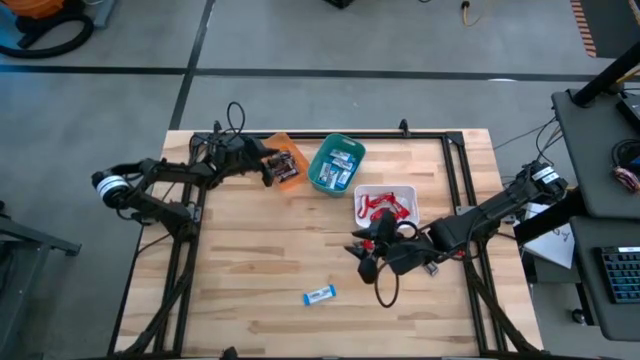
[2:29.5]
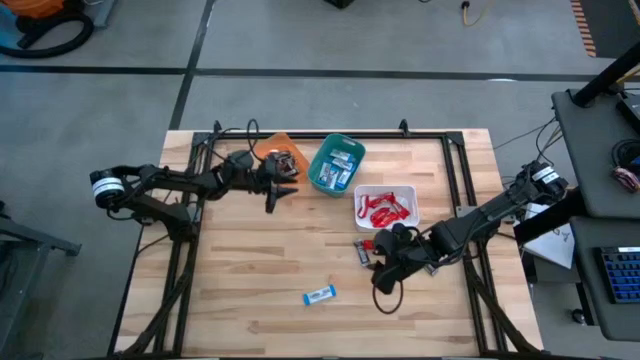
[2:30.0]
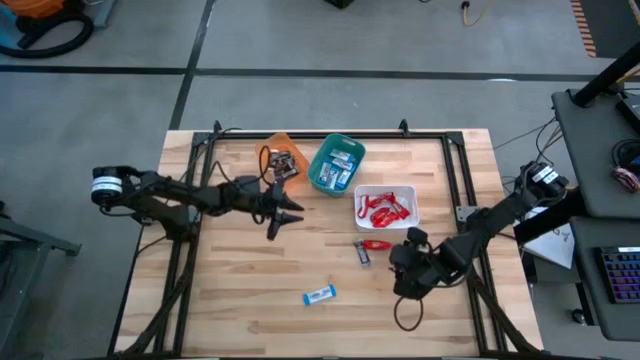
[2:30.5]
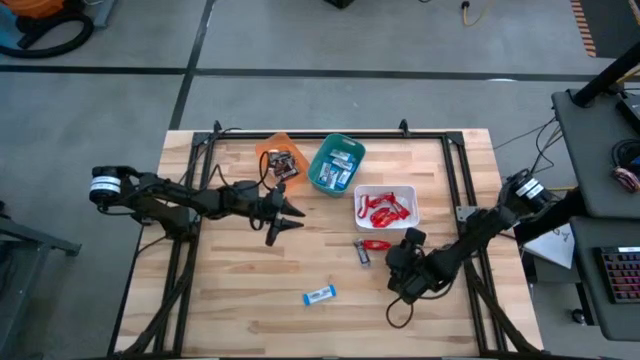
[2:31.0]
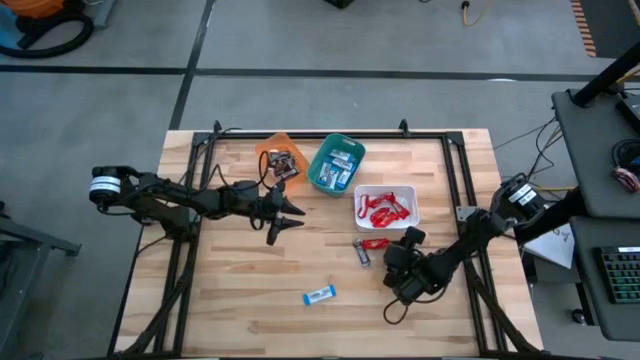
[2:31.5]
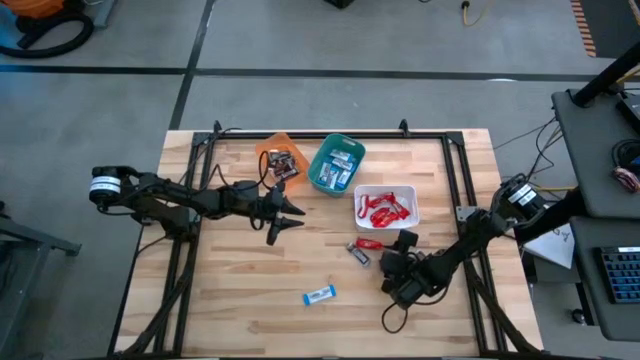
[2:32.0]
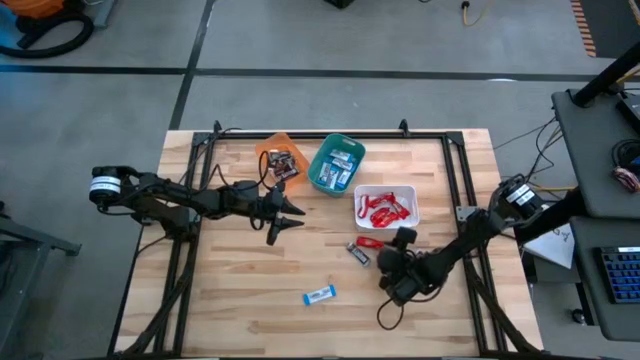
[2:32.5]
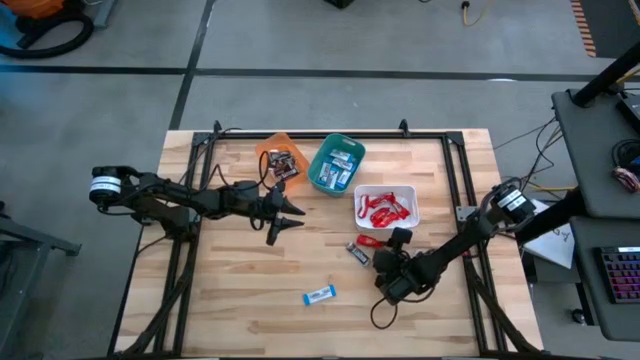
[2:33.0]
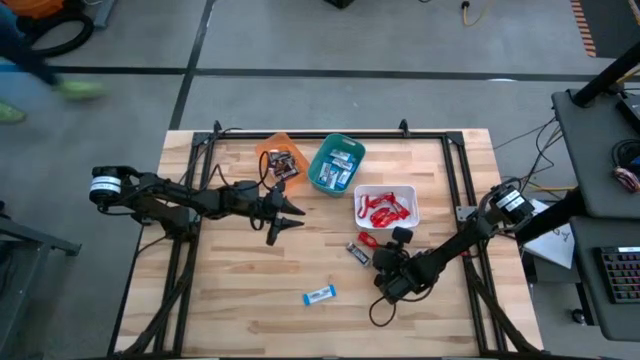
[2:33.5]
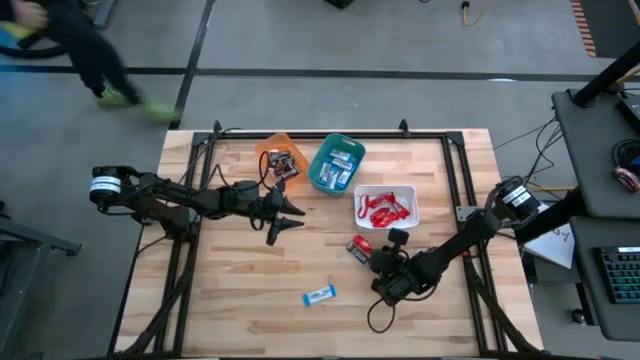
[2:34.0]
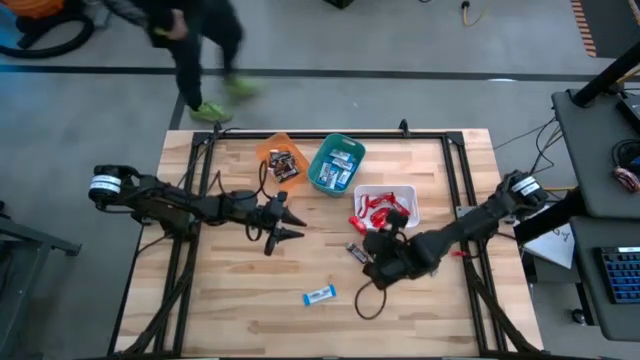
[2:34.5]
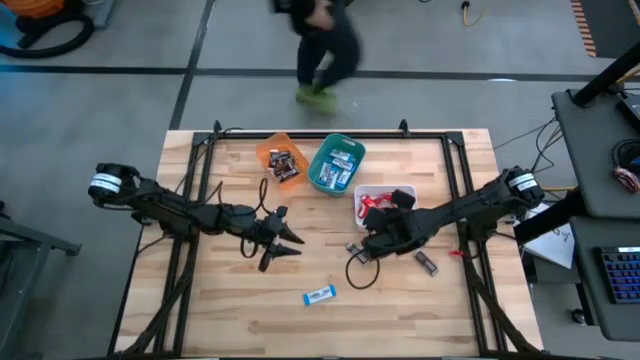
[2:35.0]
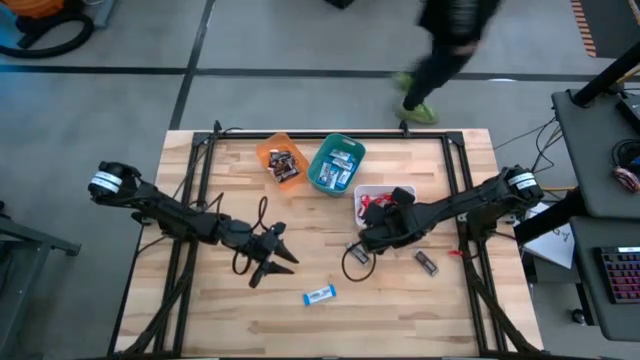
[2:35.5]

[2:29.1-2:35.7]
Task: Sort candy
Put the red chocolate bar into the white bin

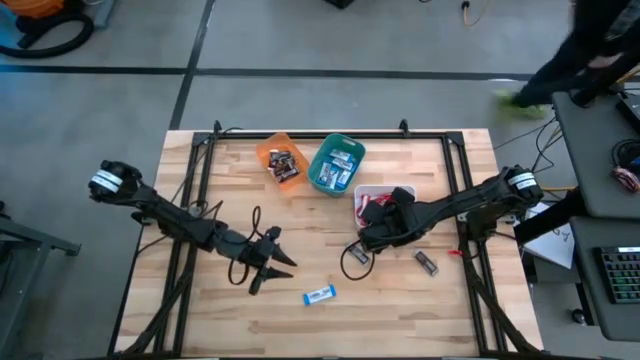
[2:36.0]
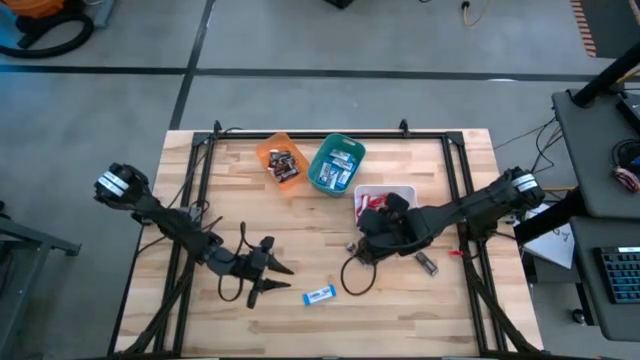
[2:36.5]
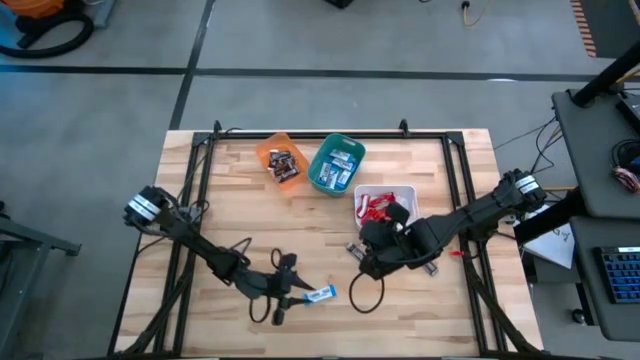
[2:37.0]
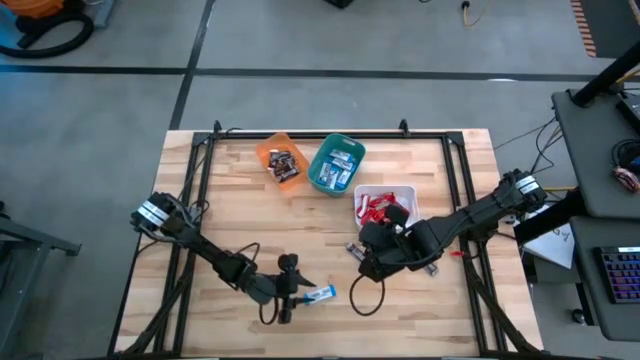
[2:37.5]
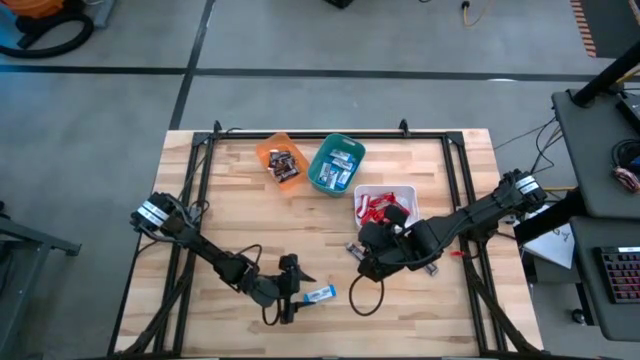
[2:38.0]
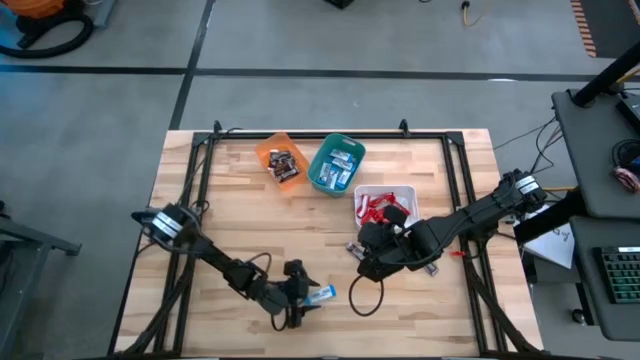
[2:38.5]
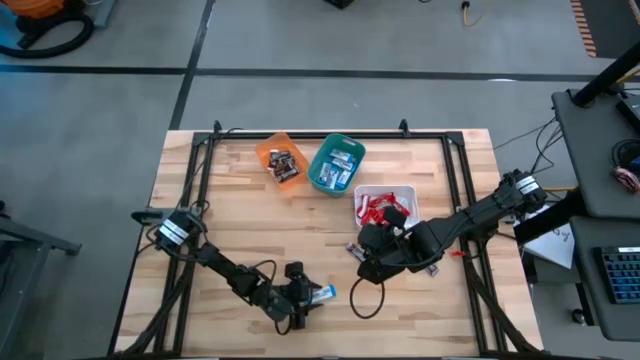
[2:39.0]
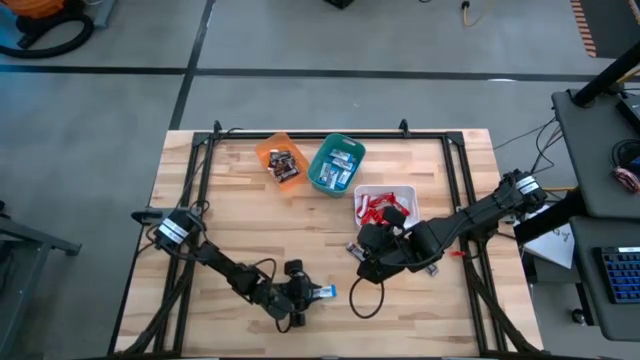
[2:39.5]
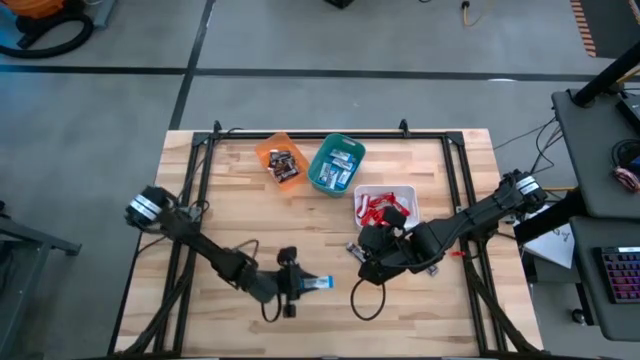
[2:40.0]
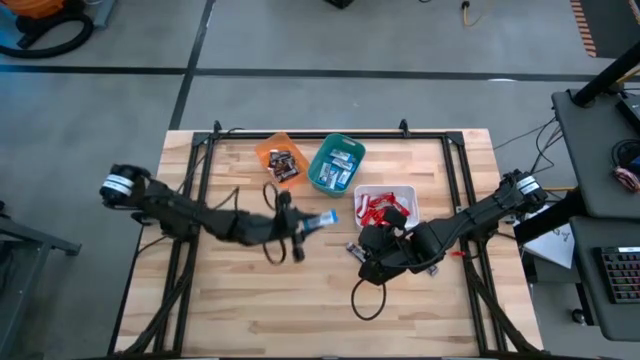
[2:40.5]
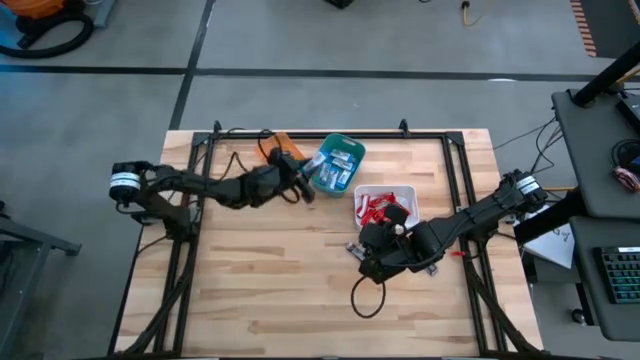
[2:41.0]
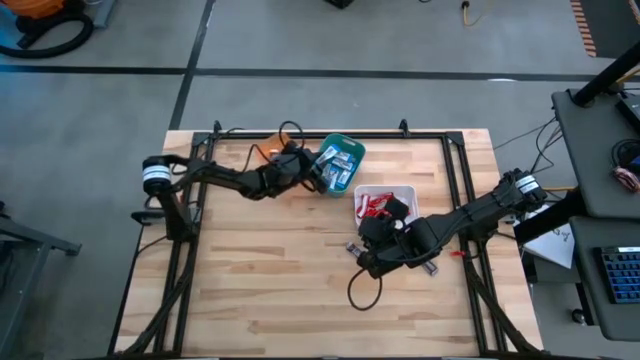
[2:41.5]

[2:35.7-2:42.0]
Put the white chocolate bar into the green bin

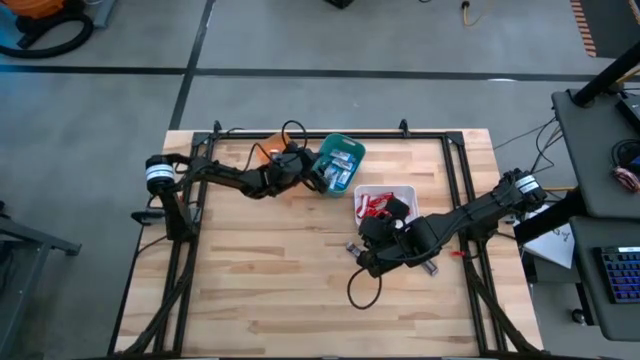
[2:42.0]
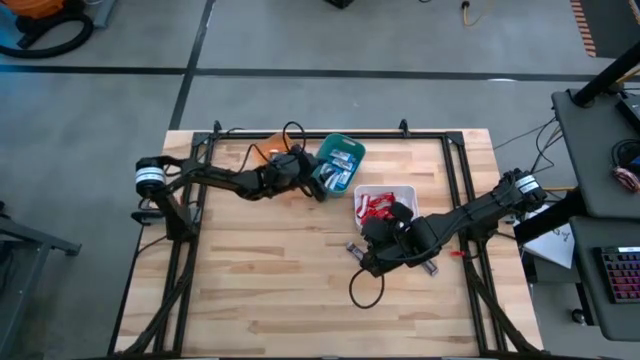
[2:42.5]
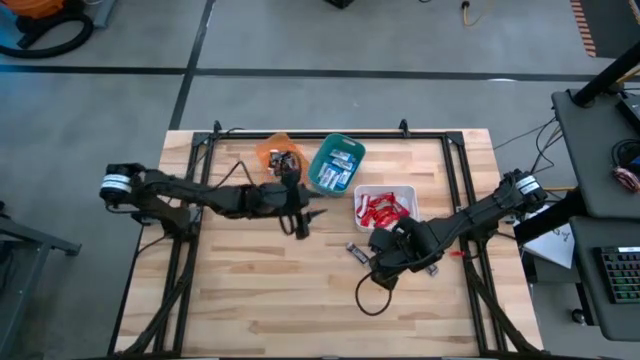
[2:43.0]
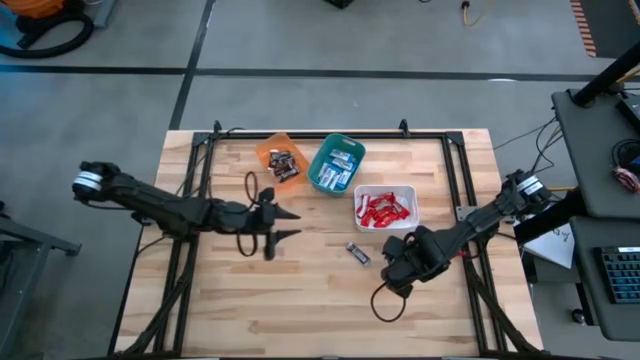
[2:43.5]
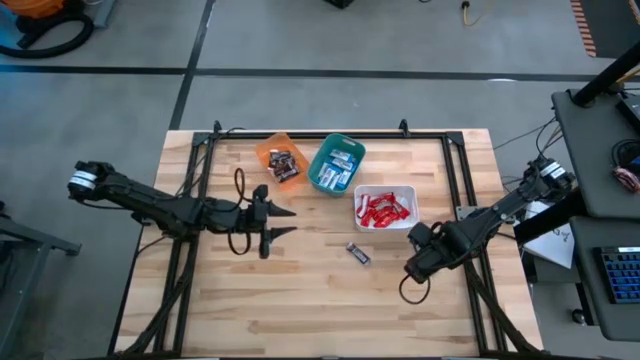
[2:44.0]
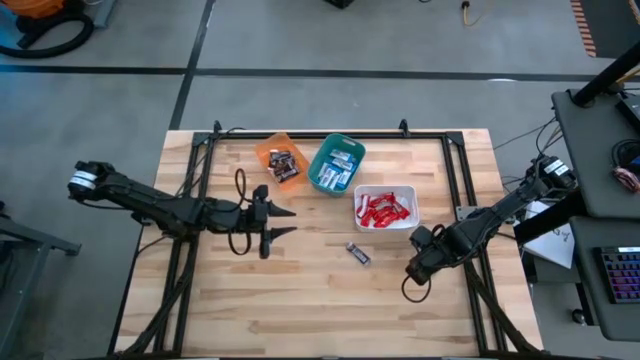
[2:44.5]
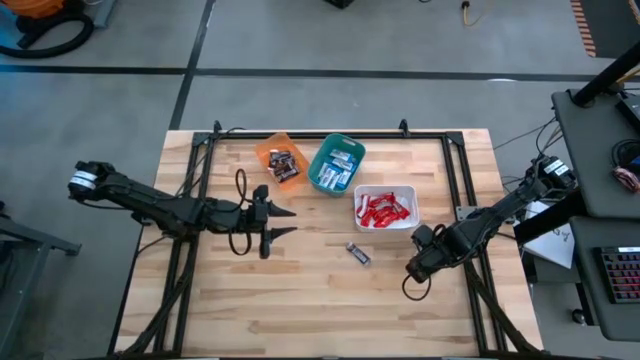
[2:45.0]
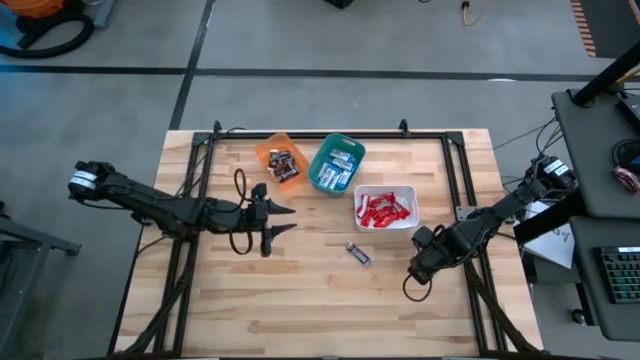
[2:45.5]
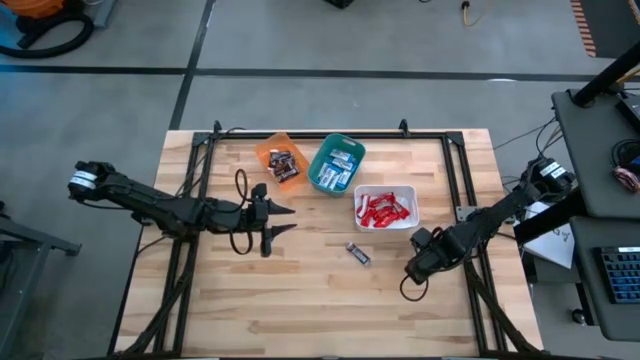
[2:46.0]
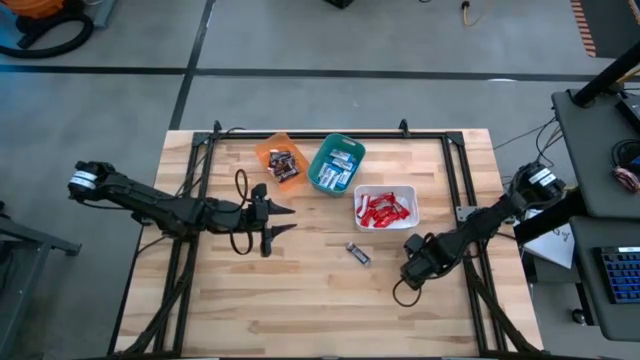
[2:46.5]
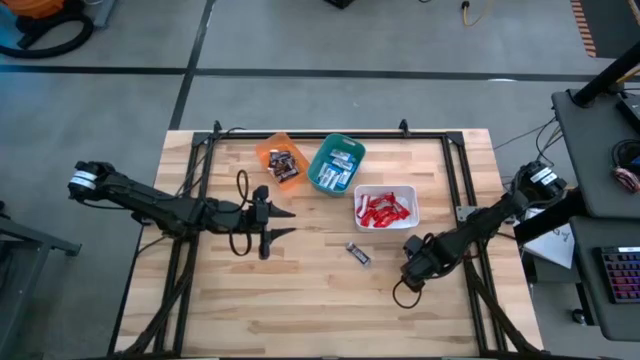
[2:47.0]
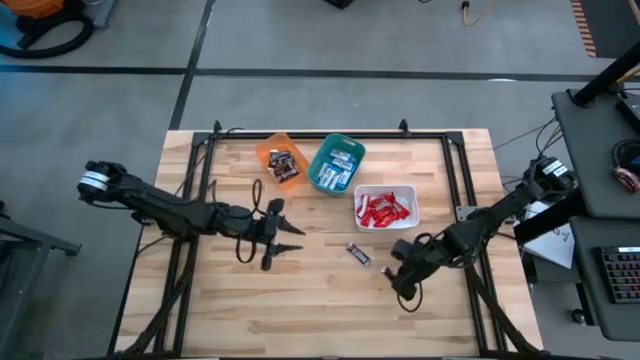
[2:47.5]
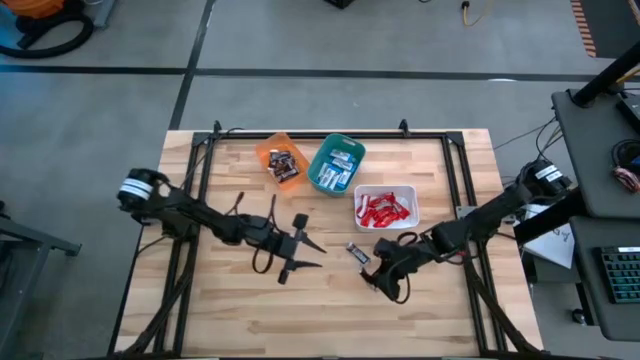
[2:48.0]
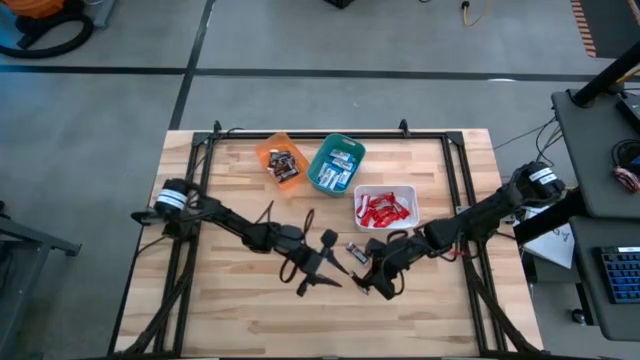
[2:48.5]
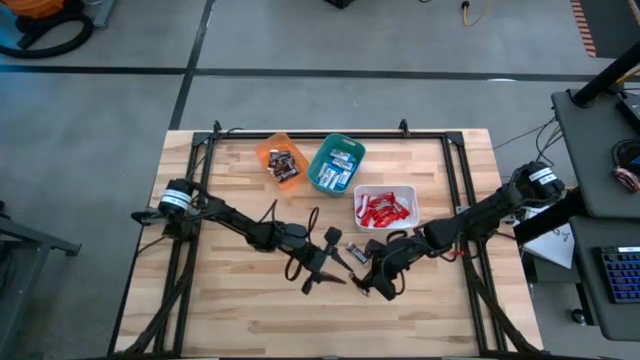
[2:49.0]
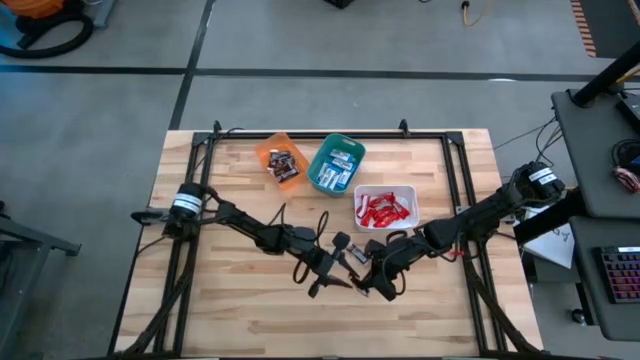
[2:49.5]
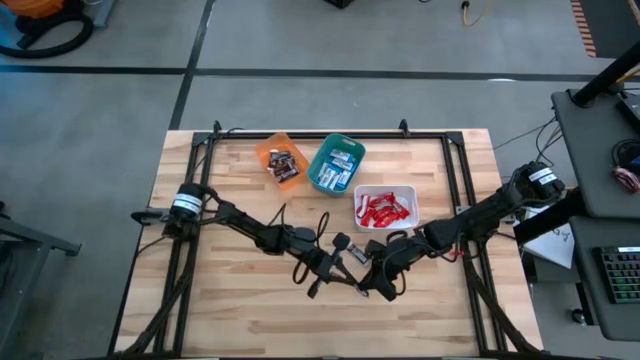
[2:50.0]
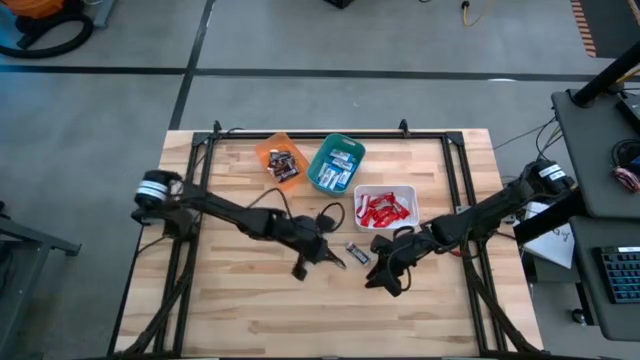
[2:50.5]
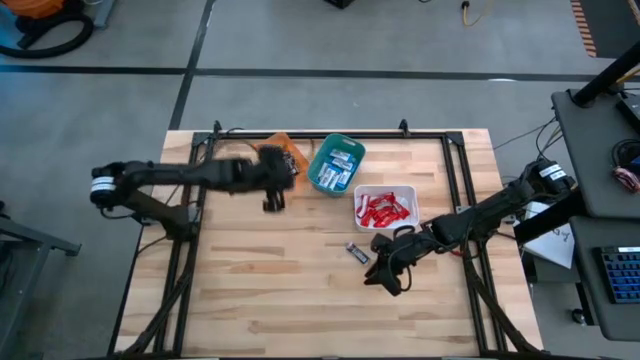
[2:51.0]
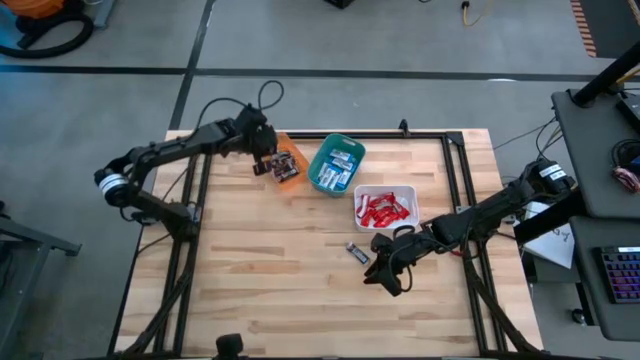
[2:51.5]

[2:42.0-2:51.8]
Put the right brown chocolate bar into the orange bin
